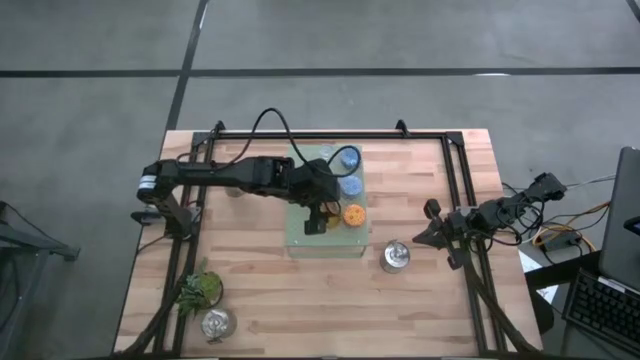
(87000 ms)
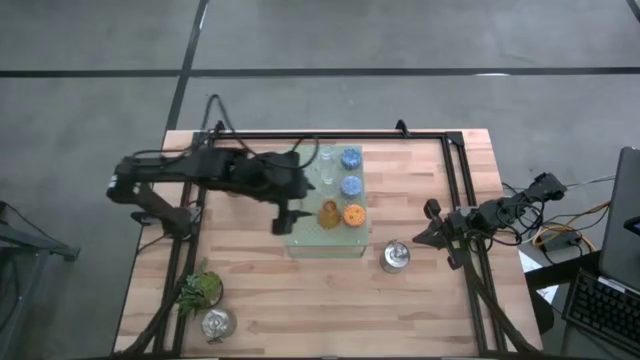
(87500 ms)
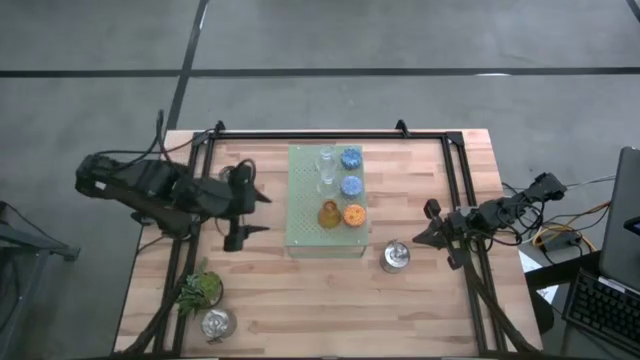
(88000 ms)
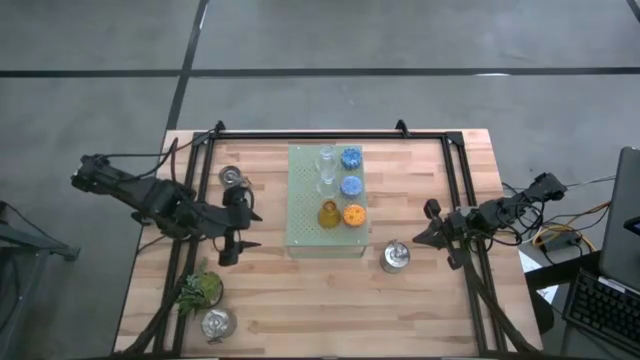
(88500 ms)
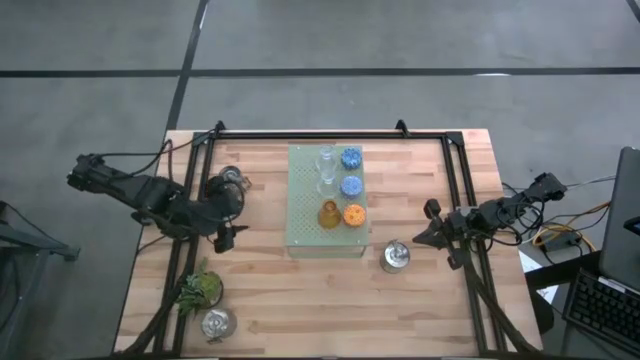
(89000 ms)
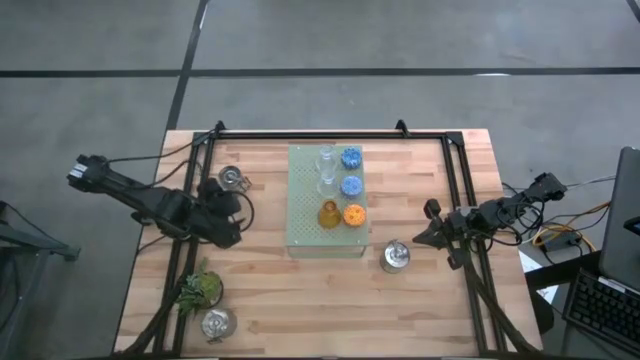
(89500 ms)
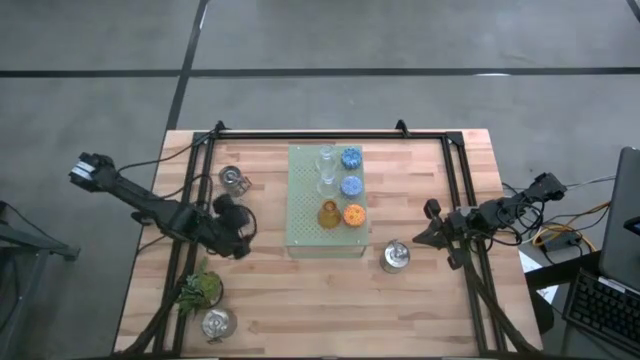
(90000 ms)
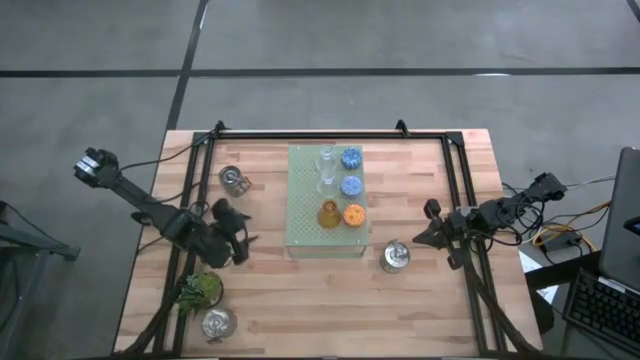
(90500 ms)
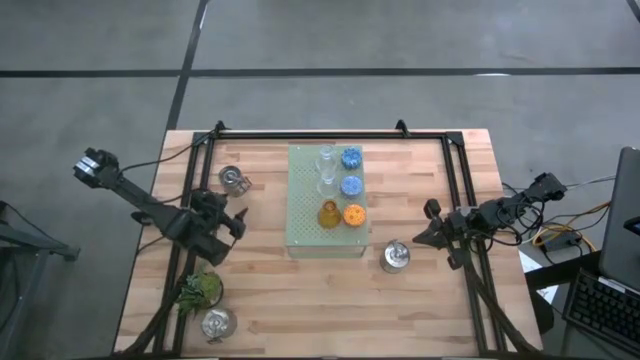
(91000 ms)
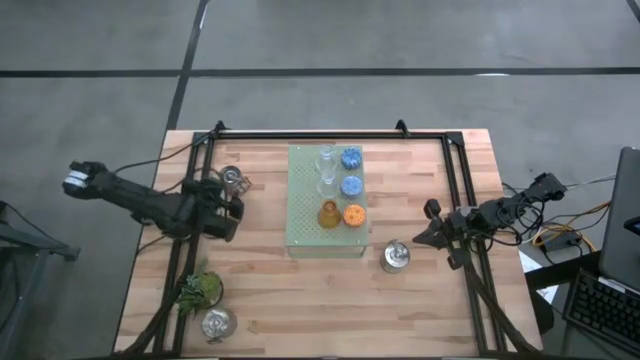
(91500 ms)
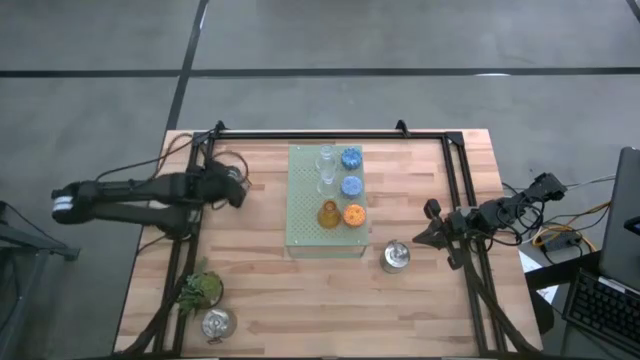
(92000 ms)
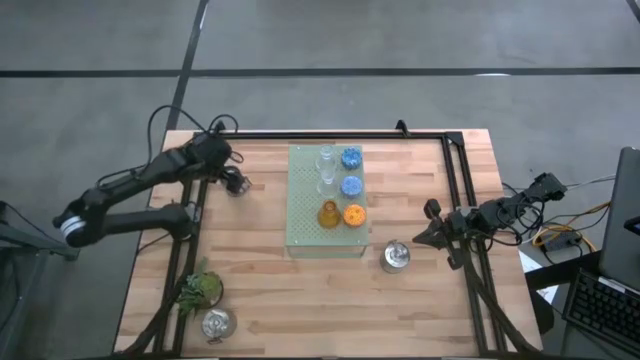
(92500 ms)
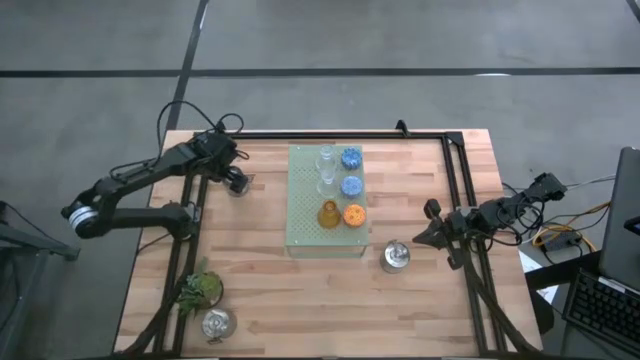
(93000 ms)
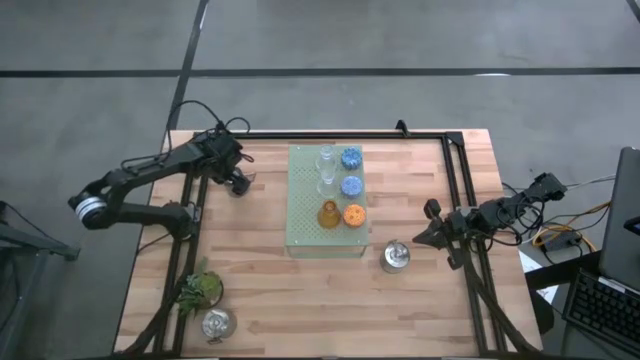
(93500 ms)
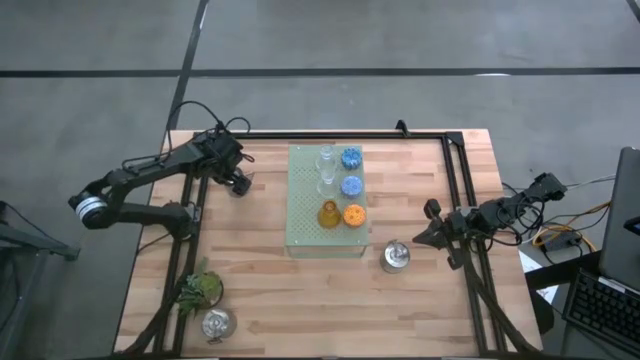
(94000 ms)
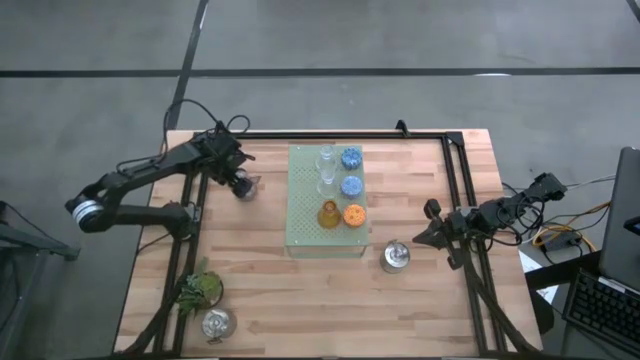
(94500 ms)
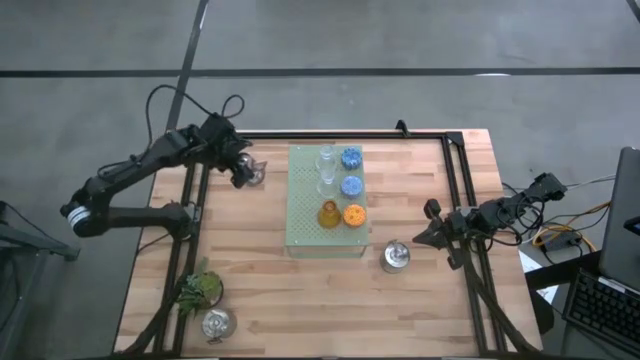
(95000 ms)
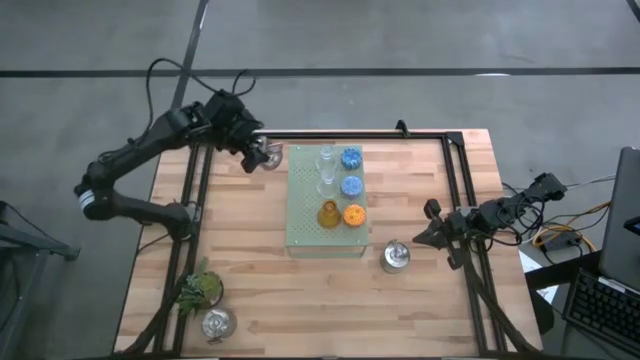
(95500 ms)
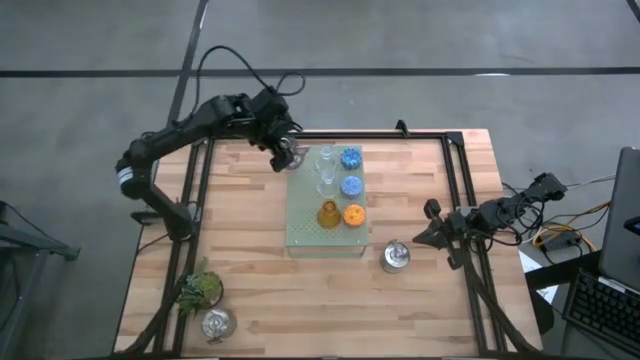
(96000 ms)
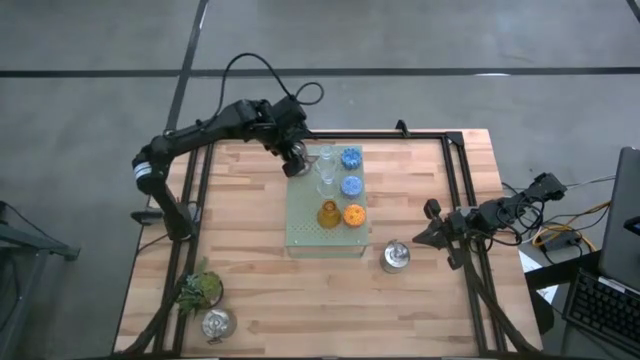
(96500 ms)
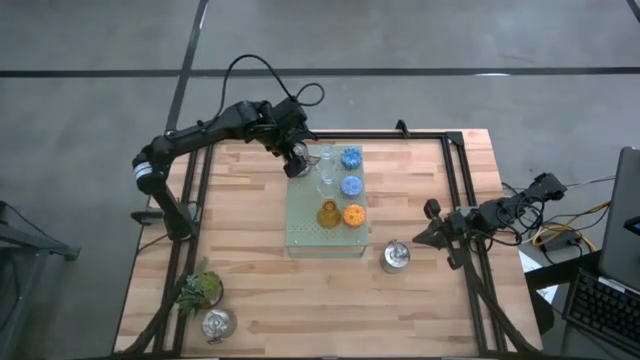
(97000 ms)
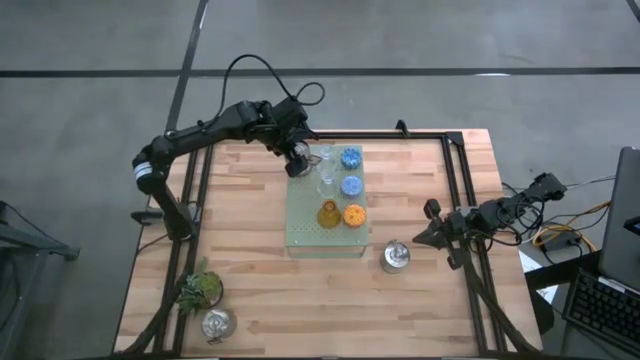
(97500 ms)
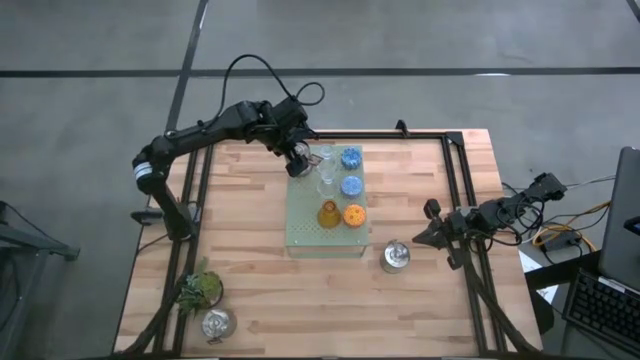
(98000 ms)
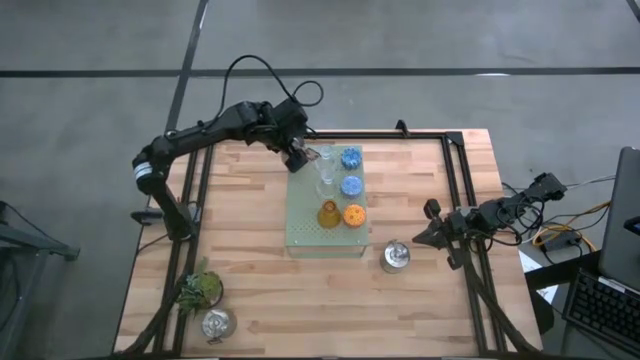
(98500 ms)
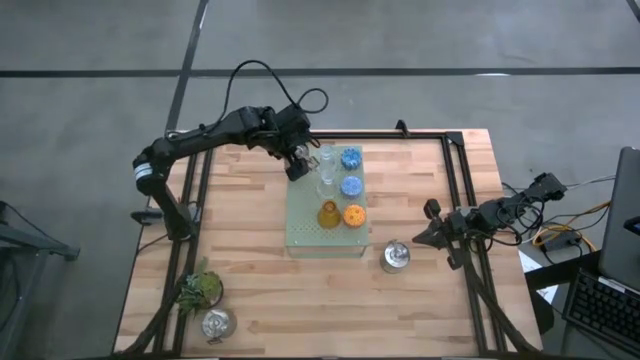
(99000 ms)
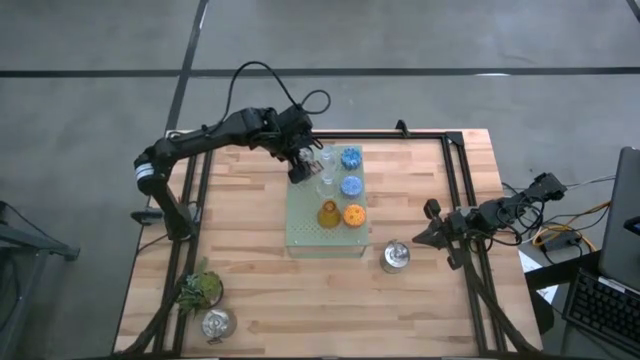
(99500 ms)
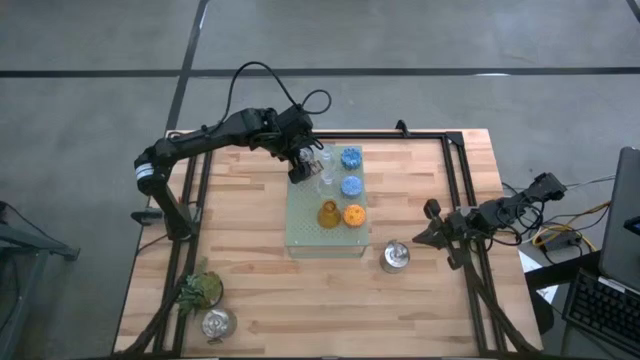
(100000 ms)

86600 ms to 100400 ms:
Task: Pick & Place candle stick holders
Put the top brown scented candle on the shelf

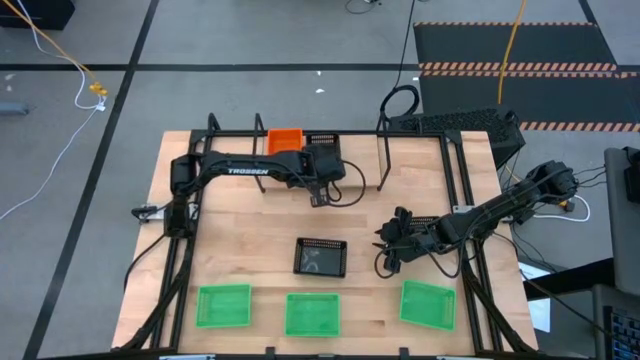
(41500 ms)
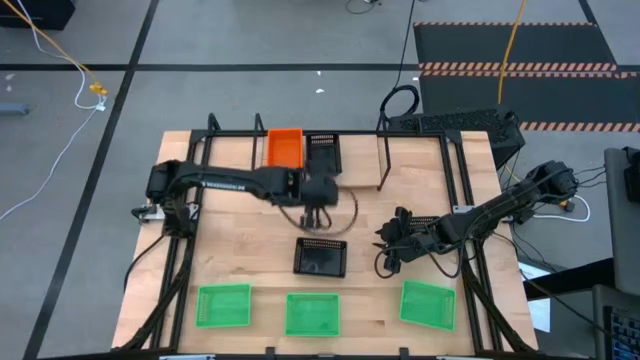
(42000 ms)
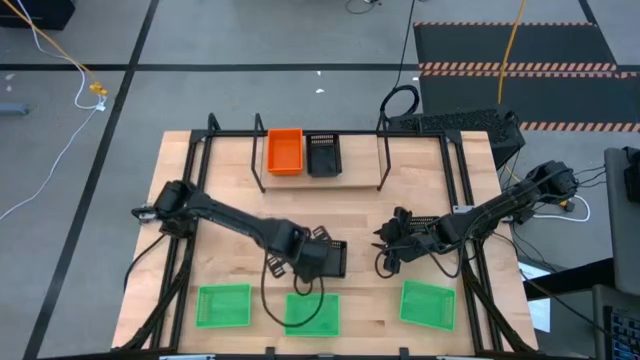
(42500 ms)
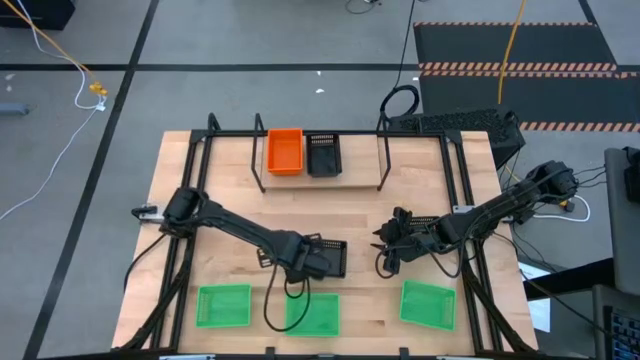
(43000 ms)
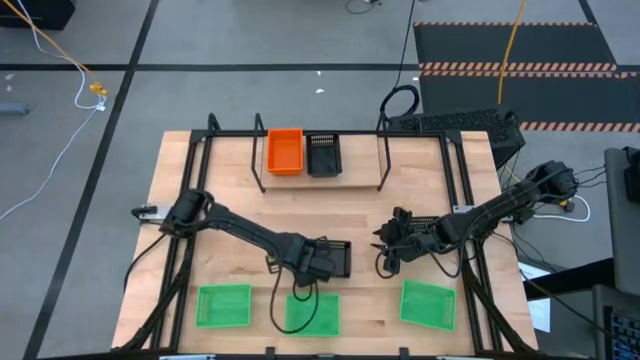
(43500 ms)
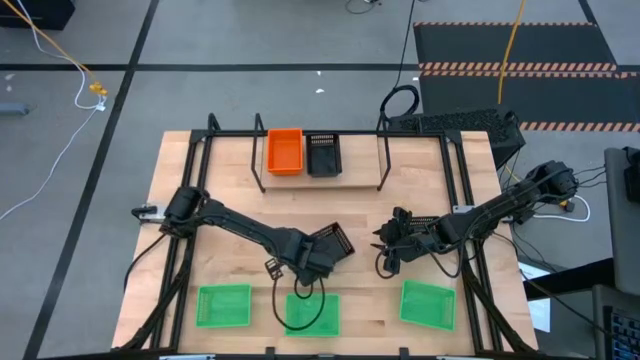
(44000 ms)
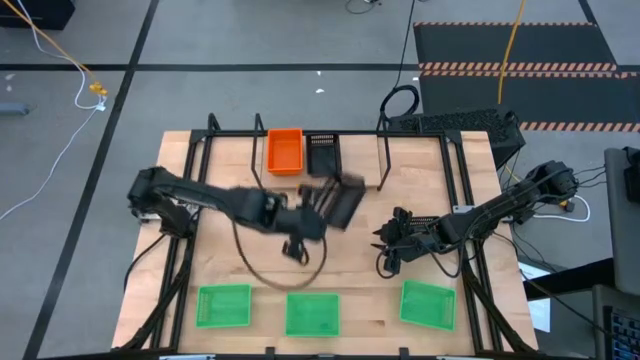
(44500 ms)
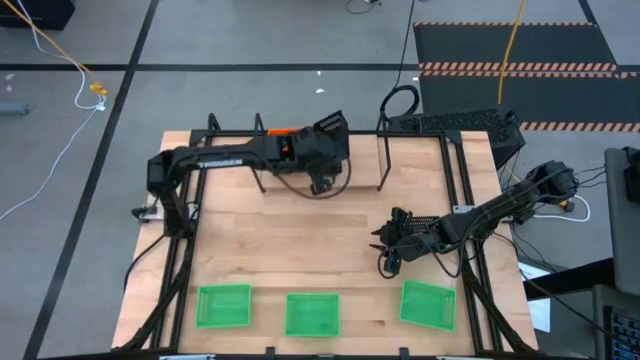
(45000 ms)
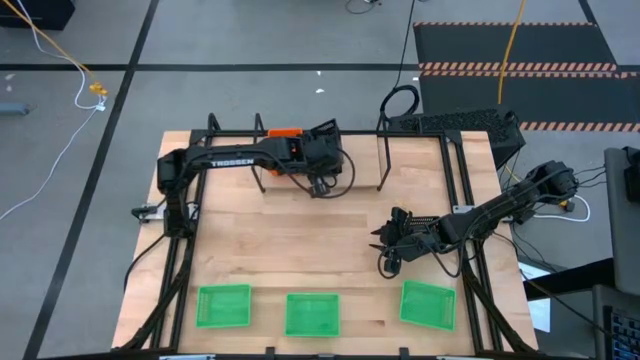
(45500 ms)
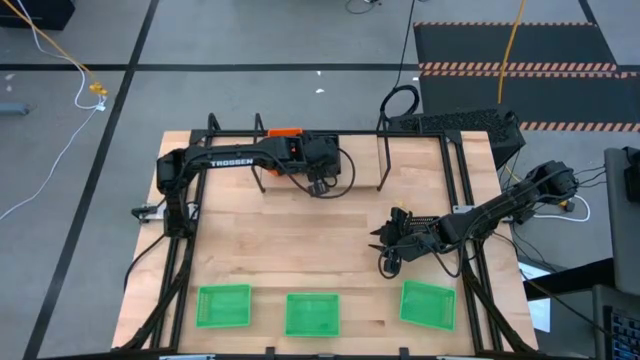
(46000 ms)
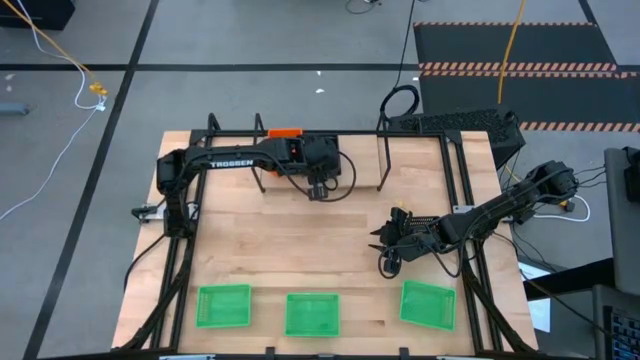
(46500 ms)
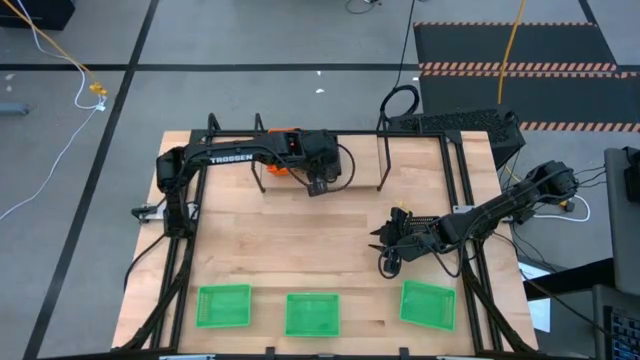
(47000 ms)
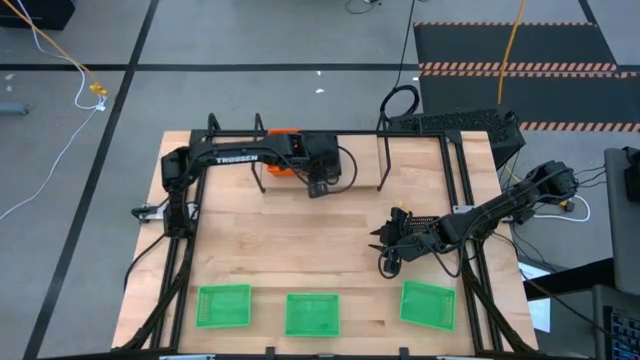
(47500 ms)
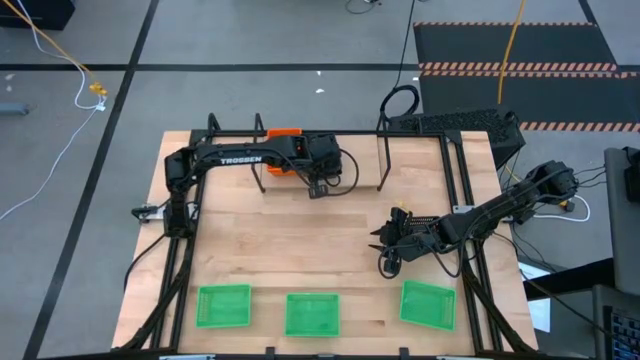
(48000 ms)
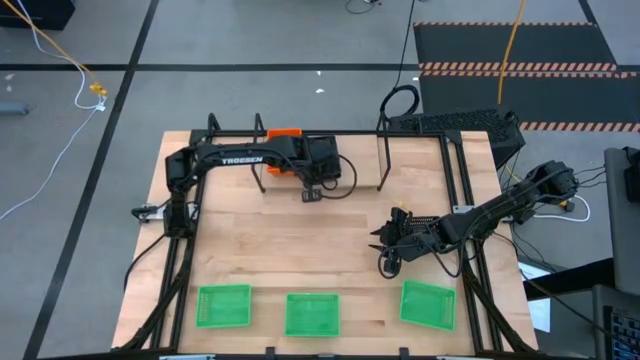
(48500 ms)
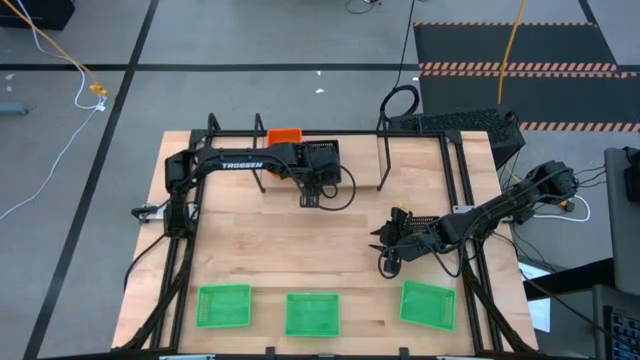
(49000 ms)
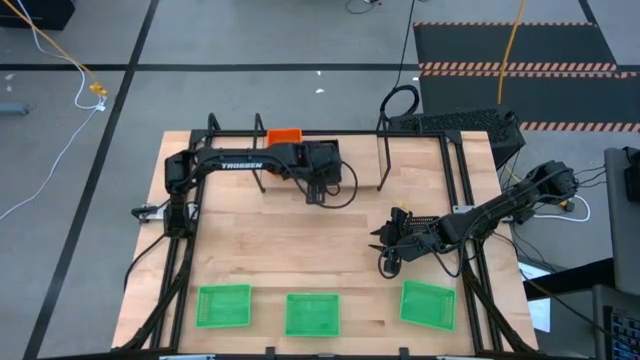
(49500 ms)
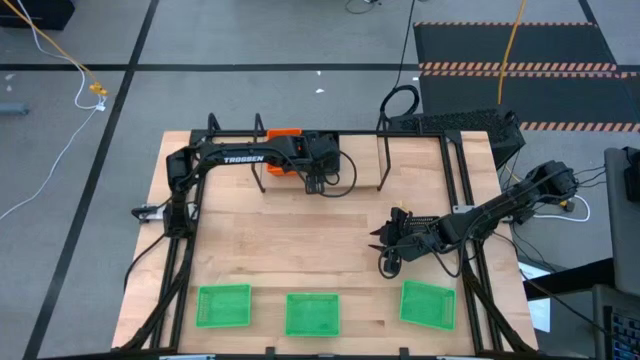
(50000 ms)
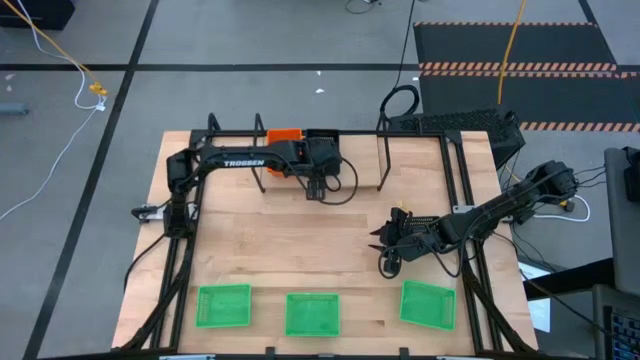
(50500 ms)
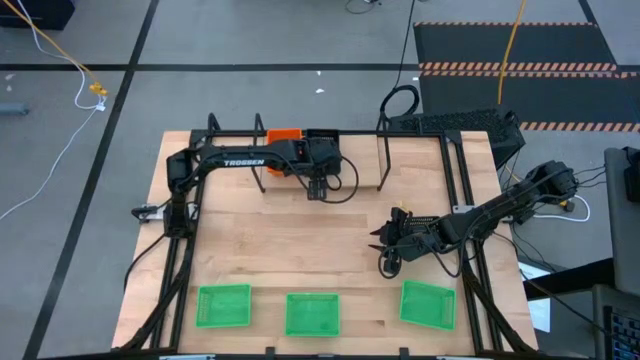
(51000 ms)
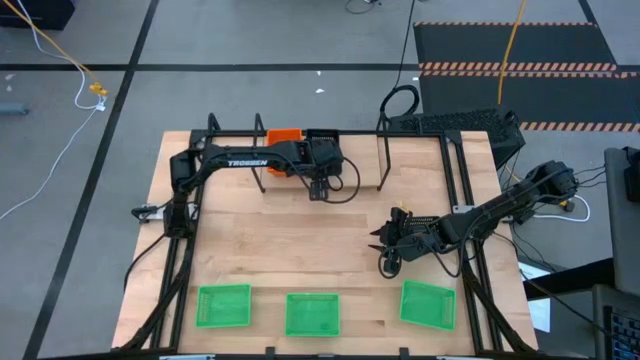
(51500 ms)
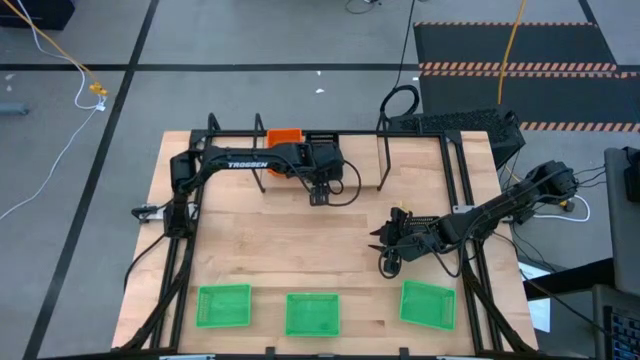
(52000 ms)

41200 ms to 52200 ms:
Task: Stack baskets on shelf by color
Stack the left black basket on top of the black basket on the shelf
